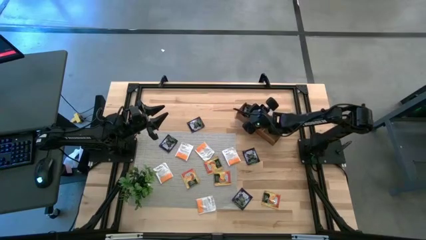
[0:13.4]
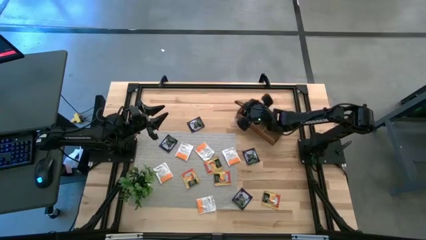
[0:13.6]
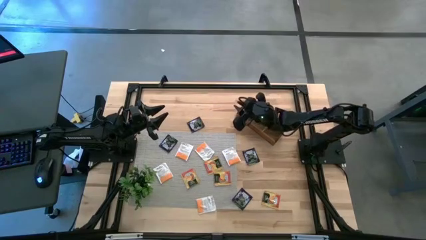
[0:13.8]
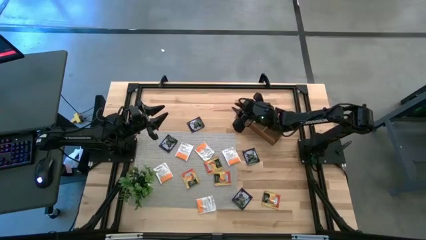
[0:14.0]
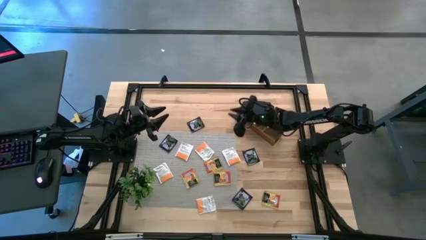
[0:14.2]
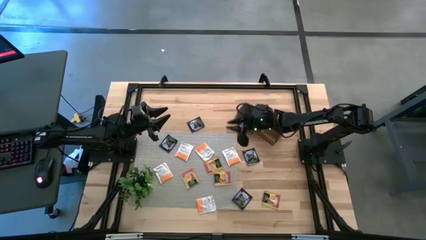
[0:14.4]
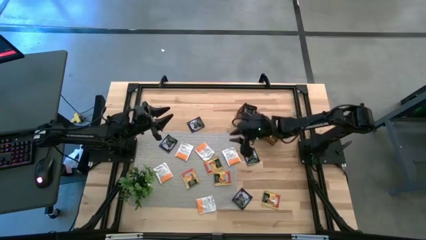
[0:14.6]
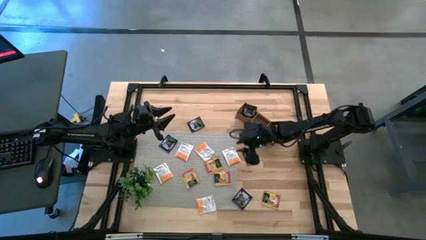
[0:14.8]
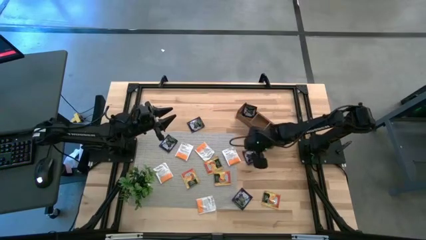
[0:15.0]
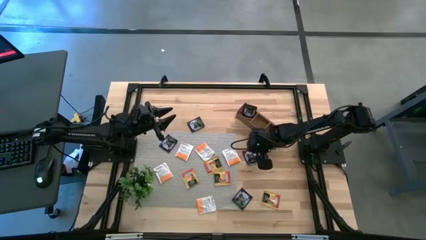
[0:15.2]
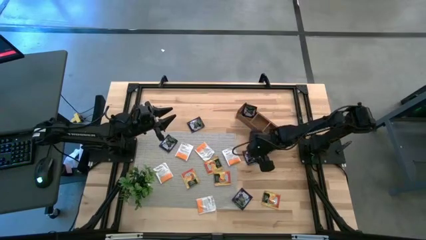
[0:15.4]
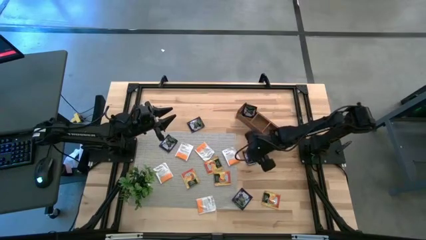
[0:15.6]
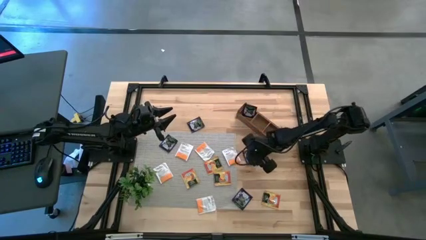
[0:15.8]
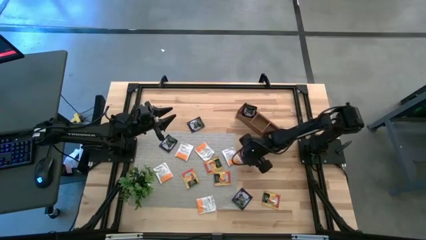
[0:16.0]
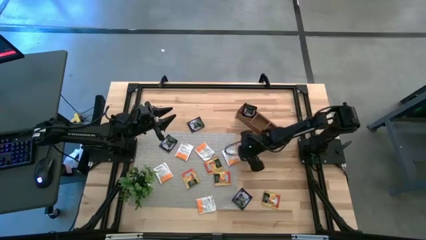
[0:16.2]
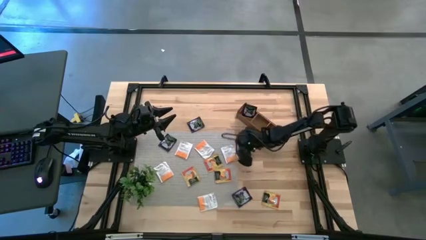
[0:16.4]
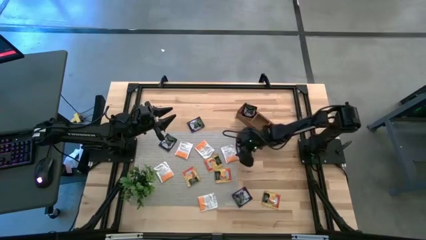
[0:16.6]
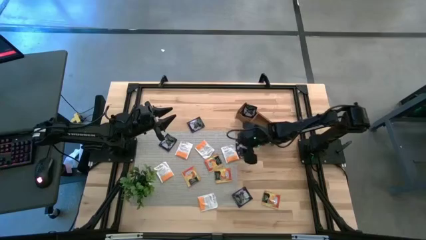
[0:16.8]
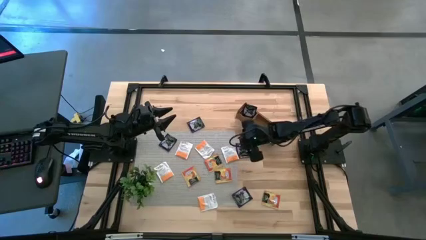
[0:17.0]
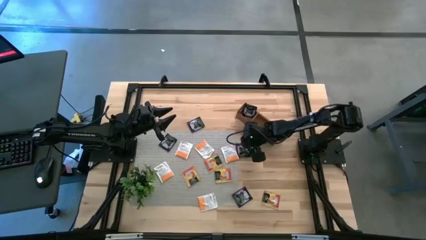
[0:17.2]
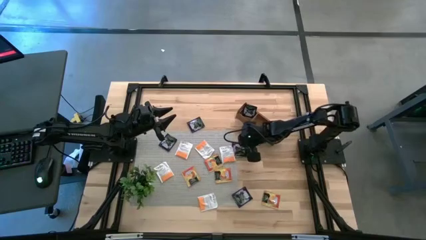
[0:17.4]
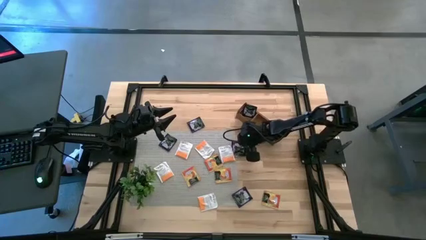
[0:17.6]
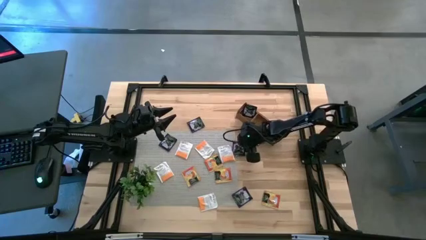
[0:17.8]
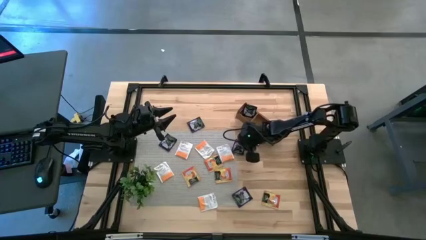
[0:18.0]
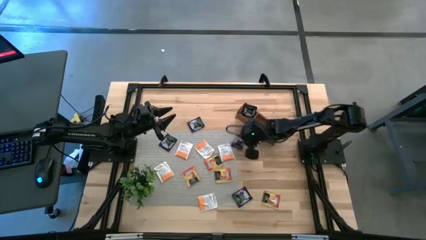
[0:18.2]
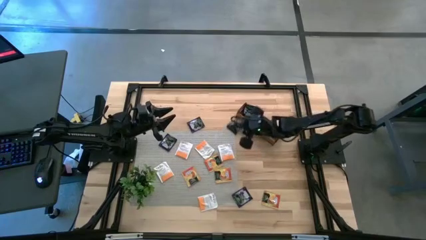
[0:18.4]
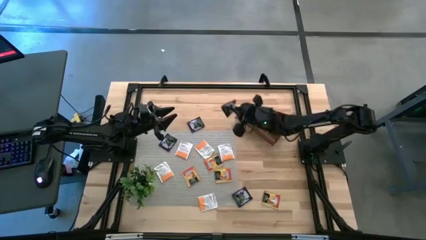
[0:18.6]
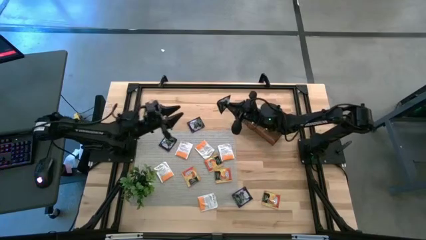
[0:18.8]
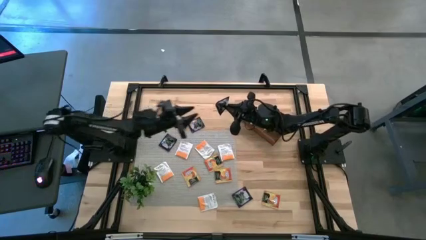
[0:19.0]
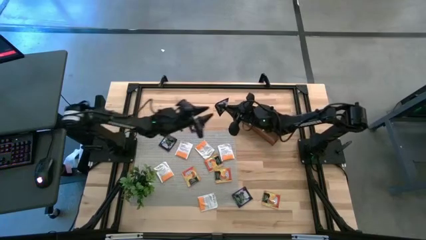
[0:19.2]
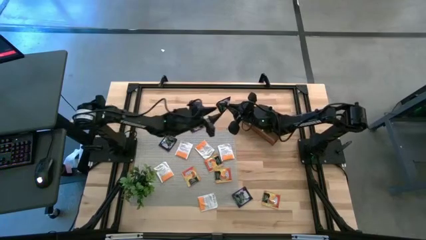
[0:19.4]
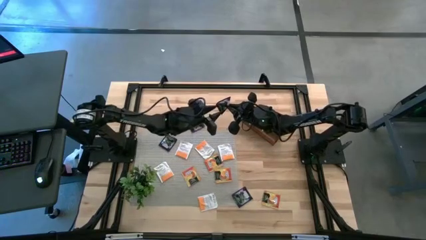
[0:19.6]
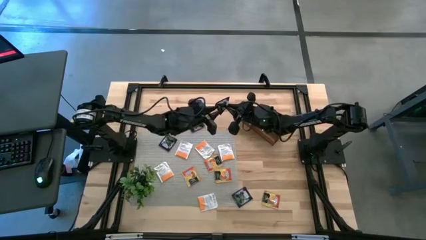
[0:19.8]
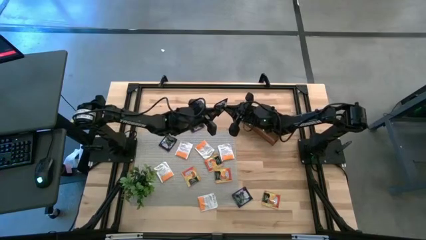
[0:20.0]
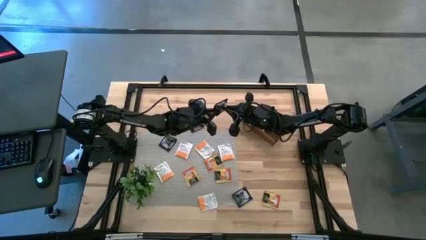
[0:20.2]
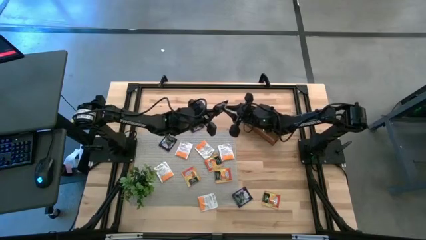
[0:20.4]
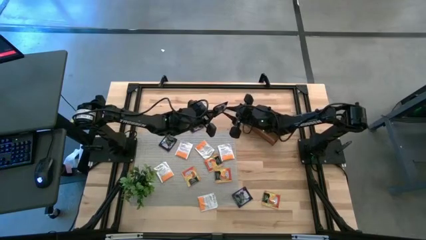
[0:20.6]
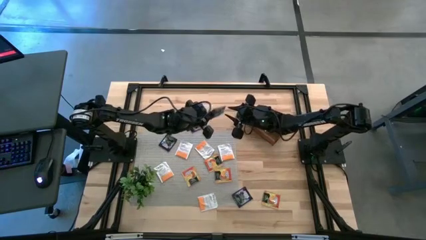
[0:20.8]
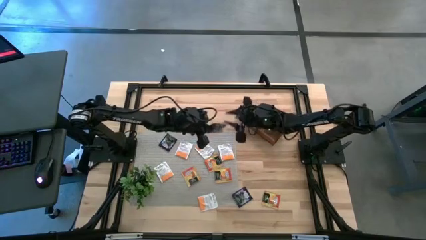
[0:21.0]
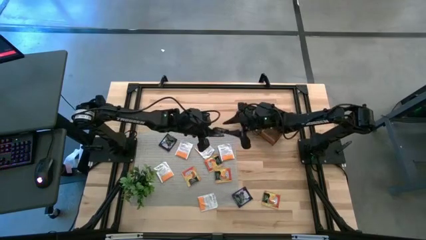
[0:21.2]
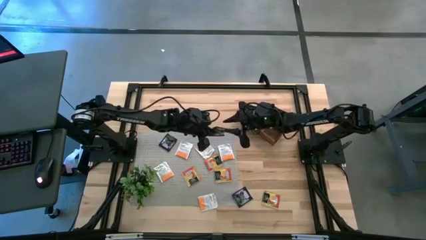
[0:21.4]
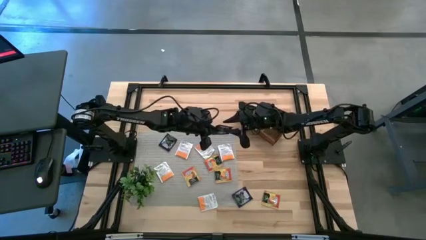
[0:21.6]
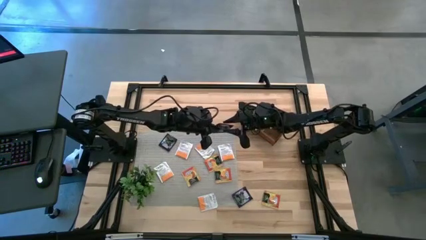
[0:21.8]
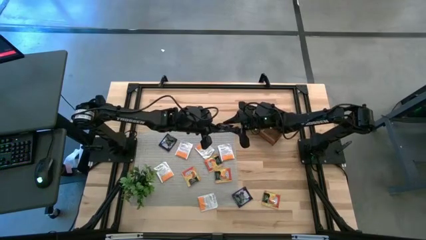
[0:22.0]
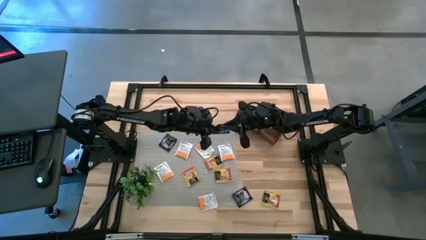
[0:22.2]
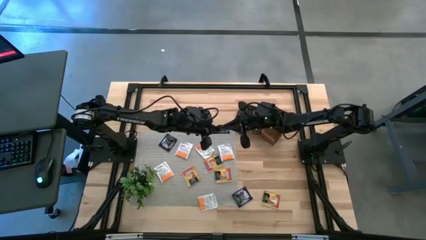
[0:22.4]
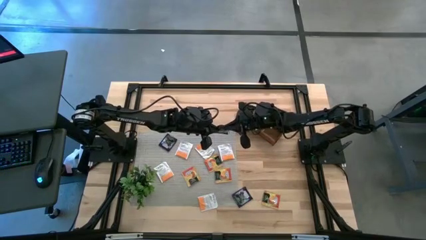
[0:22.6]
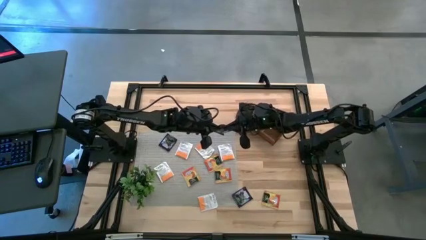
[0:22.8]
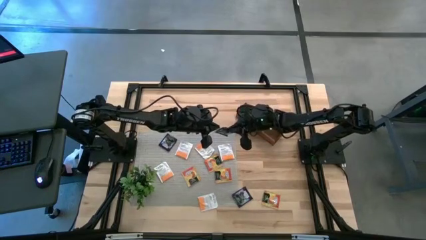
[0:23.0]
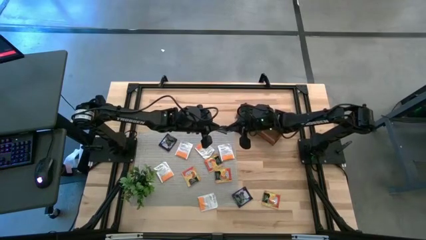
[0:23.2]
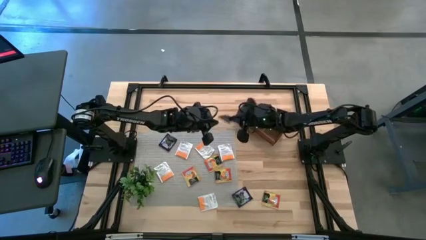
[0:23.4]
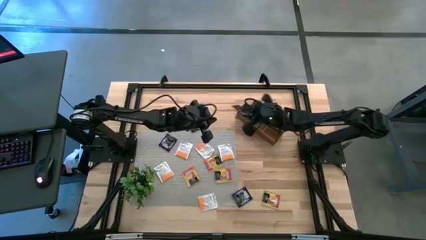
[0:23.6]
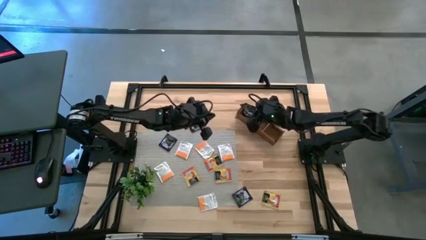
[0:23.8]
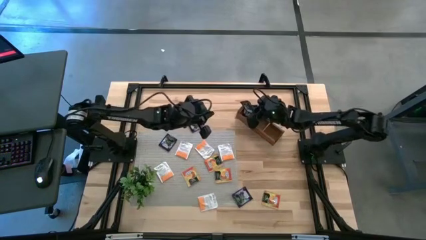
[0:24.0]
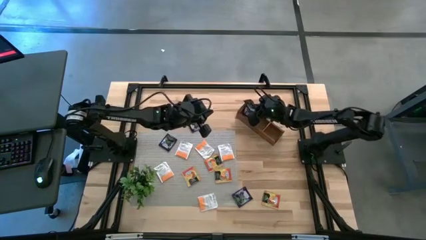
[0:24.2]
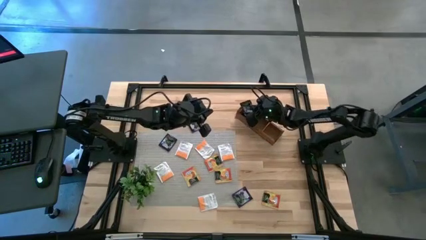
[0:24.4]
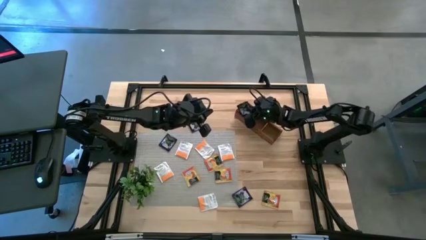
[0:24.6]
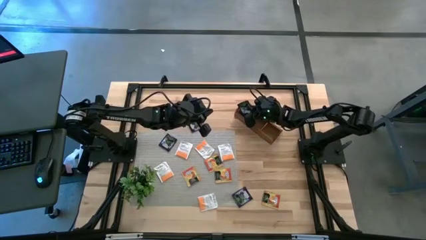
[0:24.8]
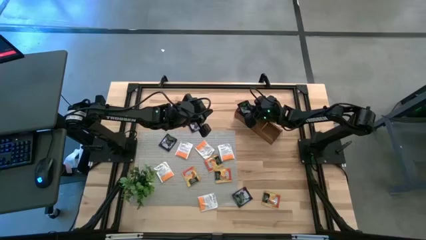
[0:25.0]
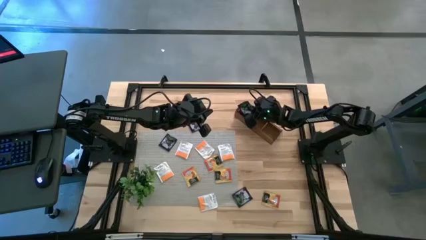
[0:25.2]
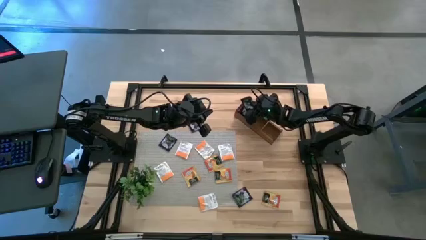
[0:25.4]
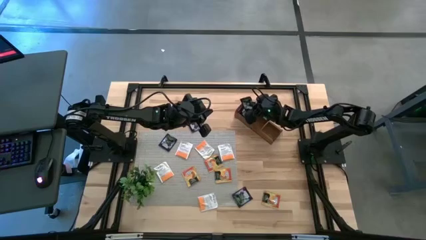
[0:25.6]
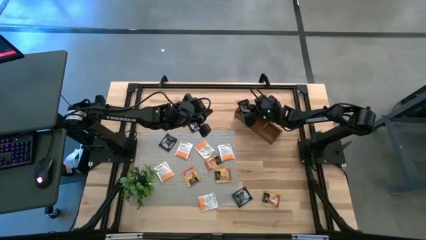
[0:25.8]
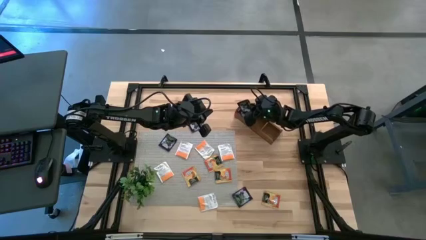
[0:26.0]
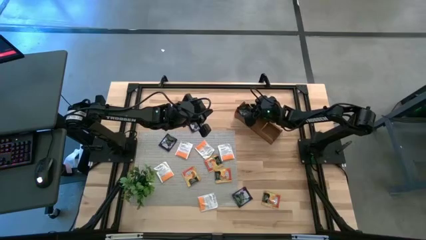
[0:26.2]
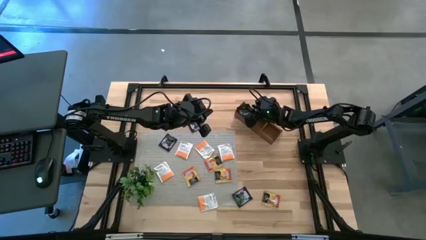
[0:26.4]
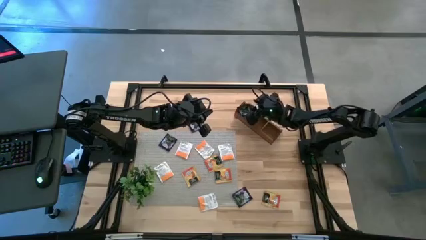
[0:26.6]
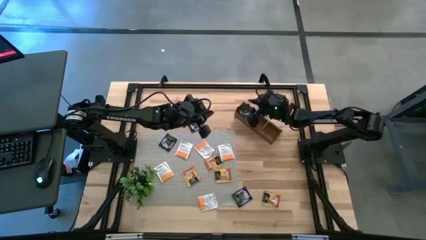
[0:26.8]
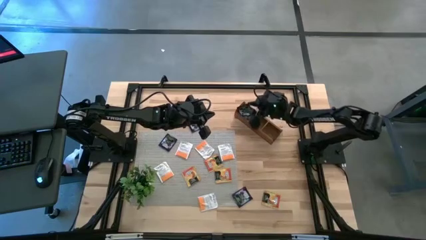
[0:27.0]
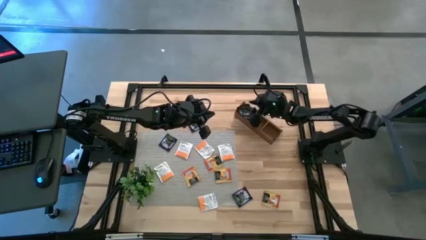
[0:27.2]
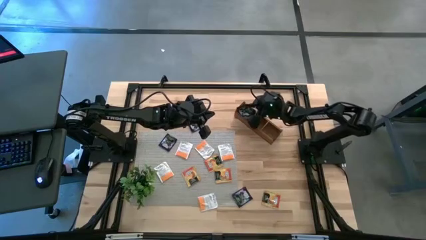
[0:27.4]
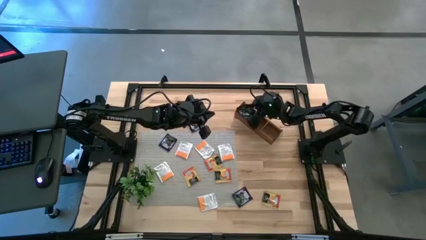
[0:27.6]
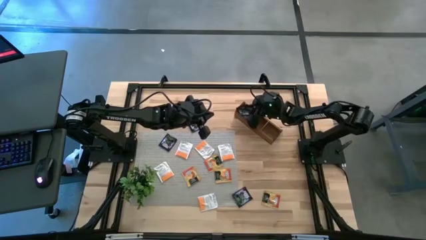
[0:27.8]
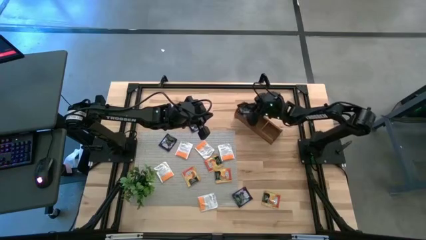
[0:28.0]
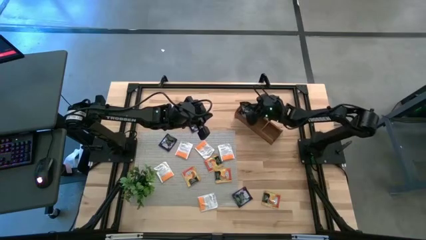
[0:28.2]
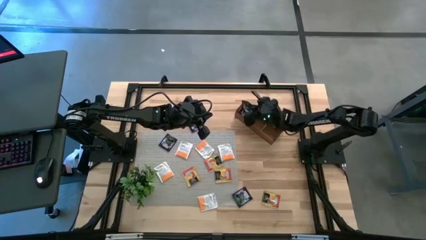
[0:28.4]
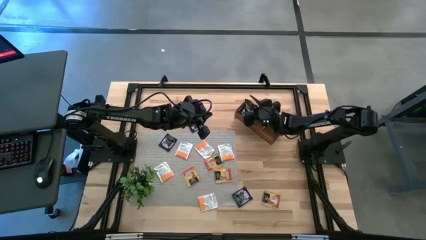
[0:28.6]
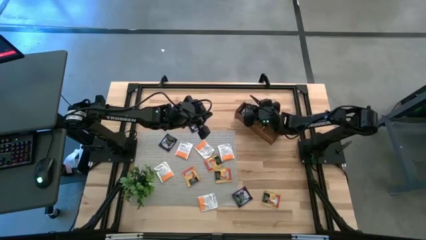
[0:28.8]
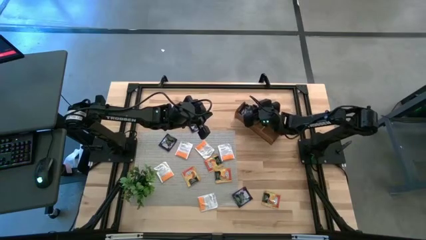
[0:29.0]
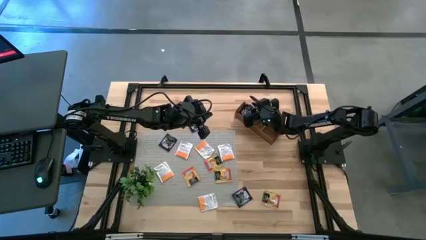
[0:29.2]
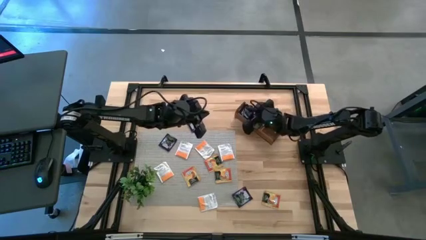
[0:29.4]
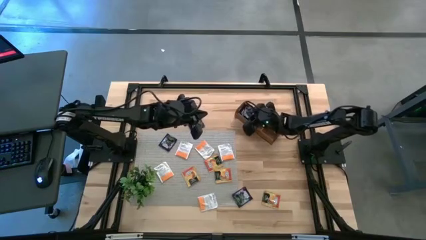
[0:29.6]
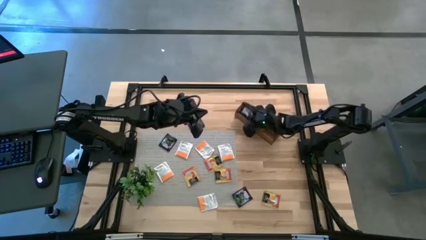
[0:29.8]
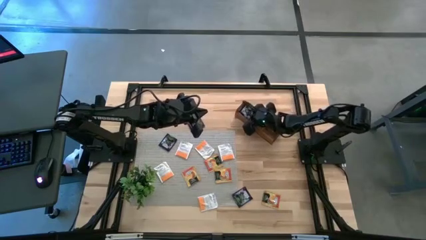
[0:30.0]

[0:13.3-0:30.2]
Task: Pick & Place Tea
Put the black tea bag into the left section of the wooden organizer
